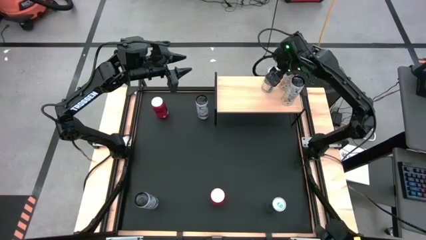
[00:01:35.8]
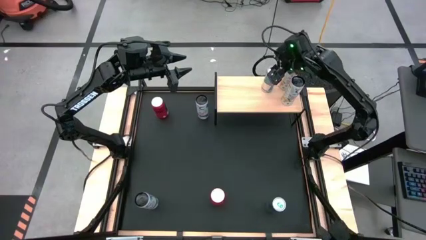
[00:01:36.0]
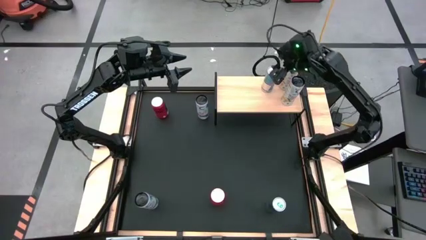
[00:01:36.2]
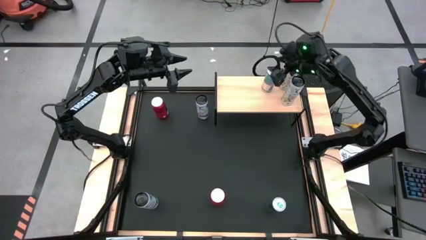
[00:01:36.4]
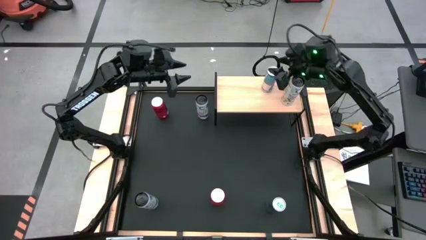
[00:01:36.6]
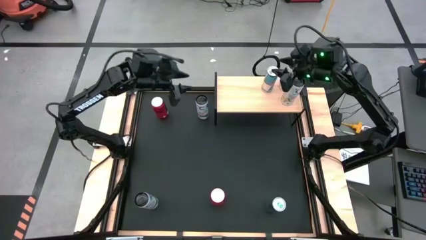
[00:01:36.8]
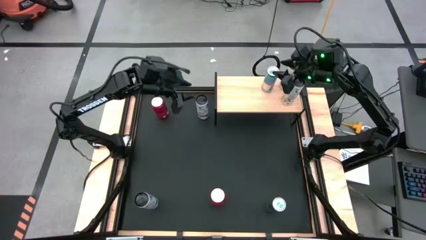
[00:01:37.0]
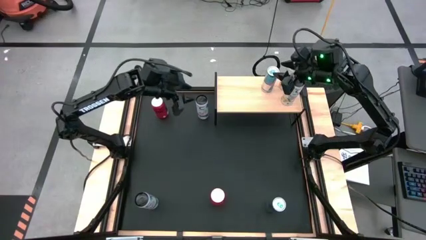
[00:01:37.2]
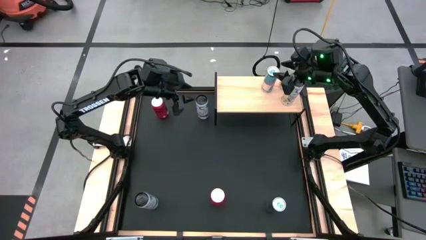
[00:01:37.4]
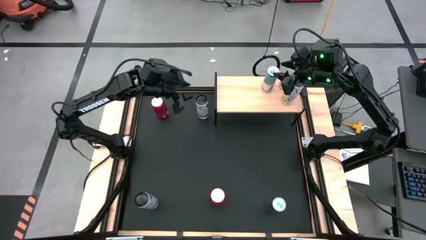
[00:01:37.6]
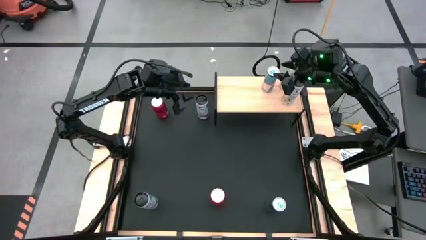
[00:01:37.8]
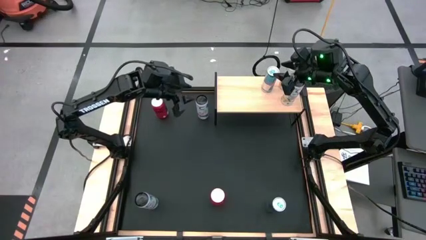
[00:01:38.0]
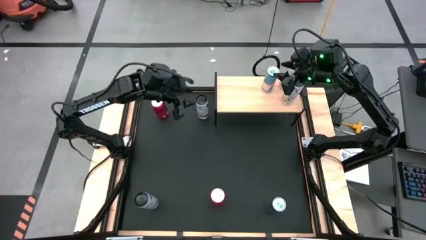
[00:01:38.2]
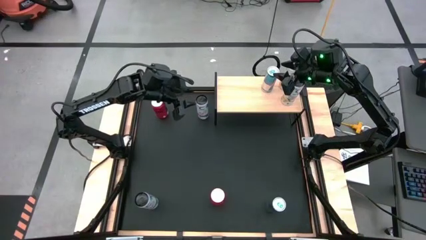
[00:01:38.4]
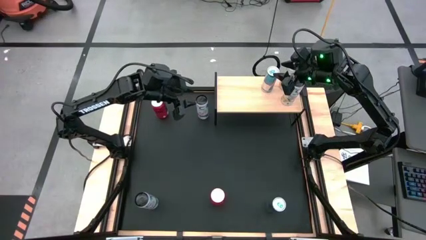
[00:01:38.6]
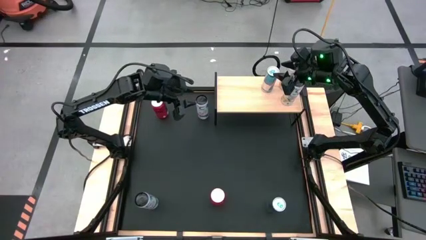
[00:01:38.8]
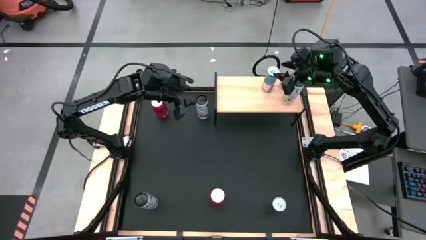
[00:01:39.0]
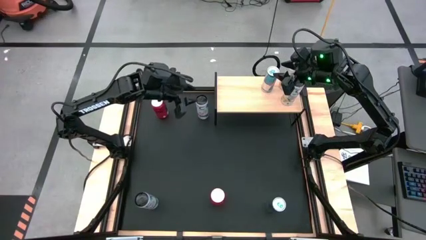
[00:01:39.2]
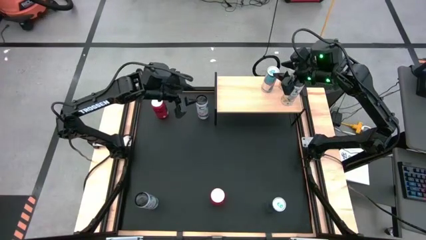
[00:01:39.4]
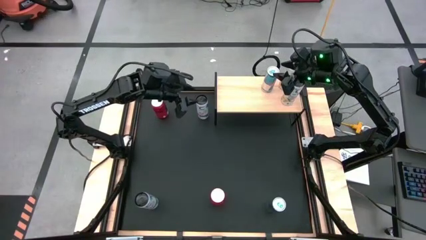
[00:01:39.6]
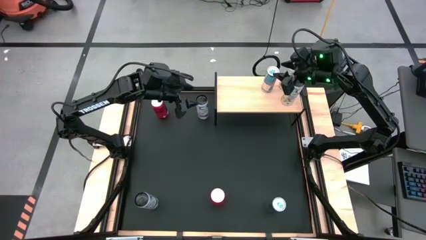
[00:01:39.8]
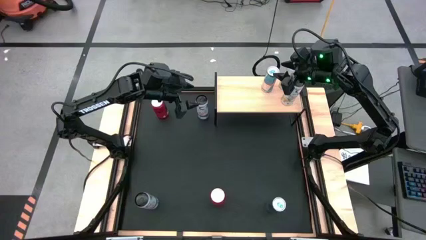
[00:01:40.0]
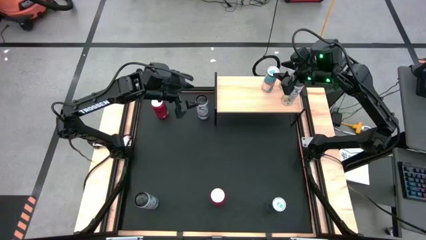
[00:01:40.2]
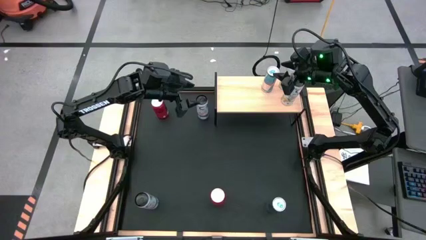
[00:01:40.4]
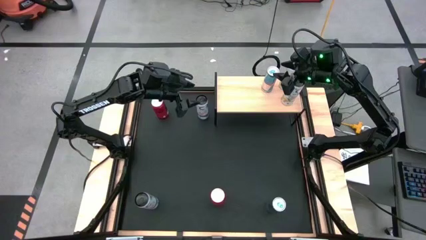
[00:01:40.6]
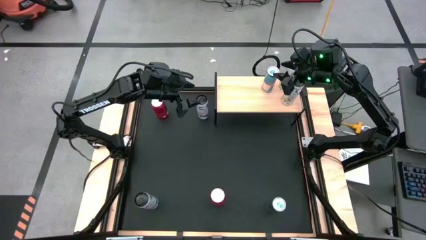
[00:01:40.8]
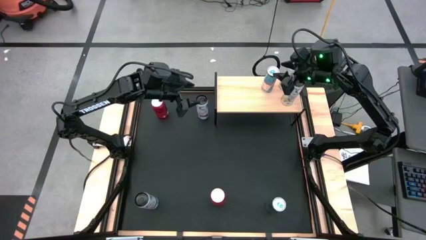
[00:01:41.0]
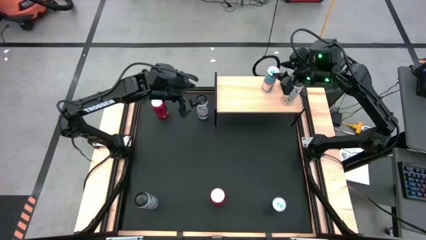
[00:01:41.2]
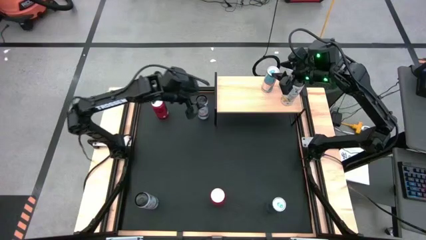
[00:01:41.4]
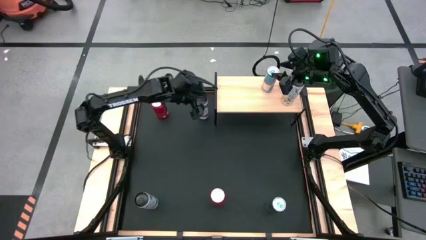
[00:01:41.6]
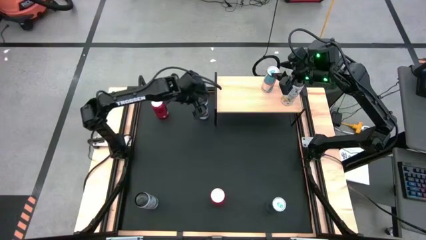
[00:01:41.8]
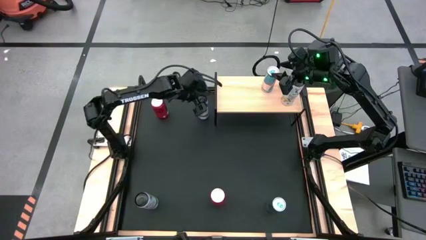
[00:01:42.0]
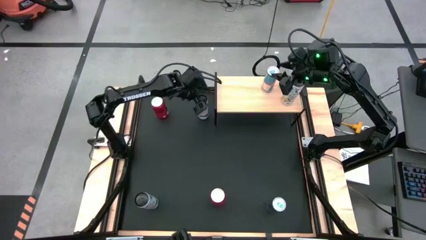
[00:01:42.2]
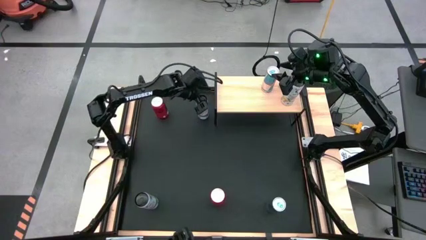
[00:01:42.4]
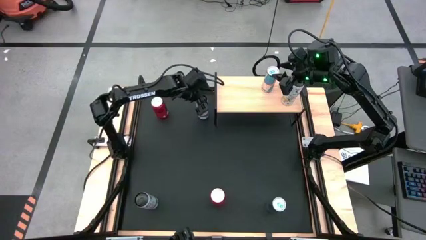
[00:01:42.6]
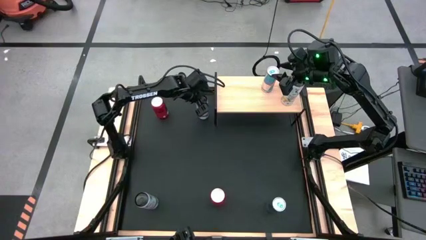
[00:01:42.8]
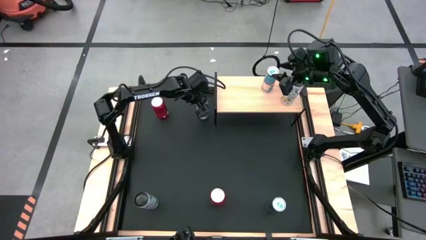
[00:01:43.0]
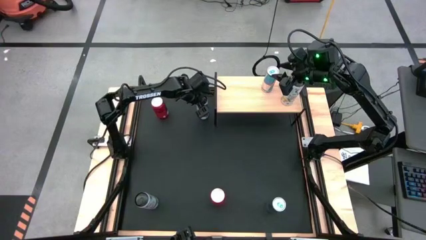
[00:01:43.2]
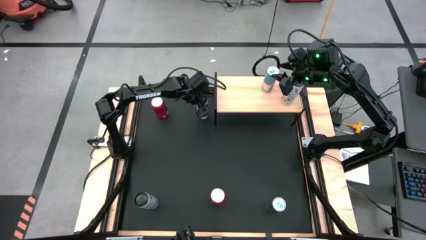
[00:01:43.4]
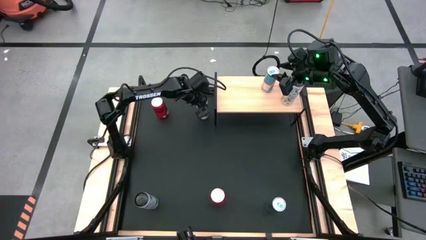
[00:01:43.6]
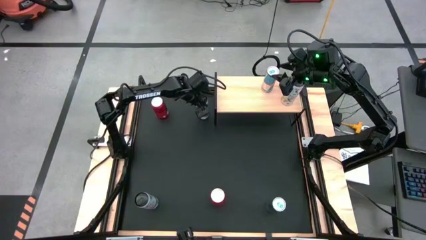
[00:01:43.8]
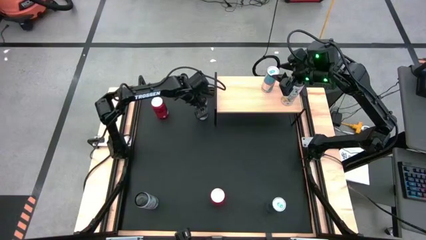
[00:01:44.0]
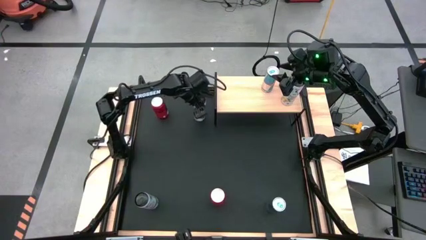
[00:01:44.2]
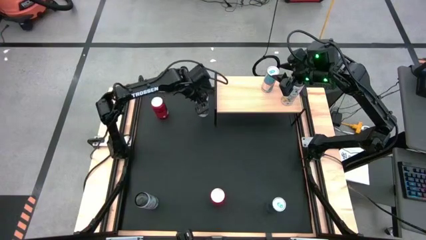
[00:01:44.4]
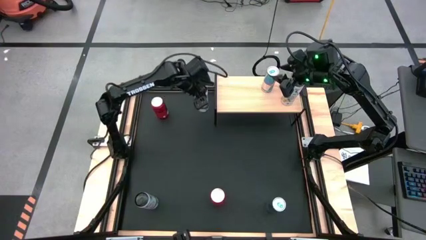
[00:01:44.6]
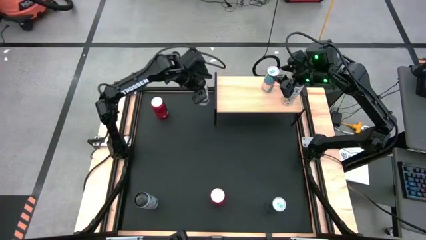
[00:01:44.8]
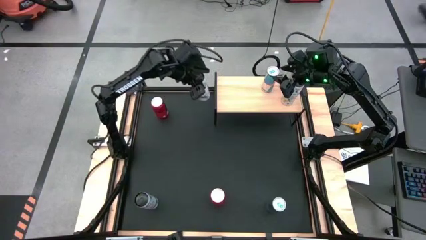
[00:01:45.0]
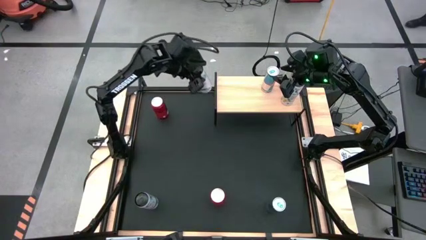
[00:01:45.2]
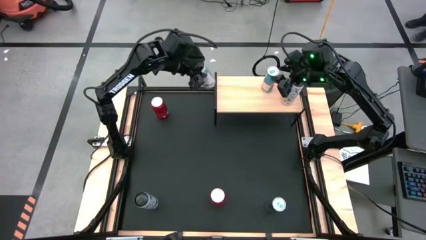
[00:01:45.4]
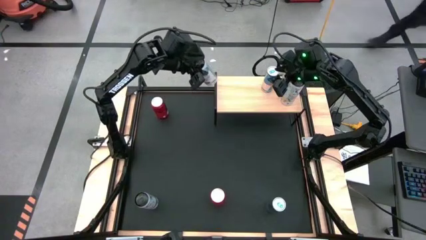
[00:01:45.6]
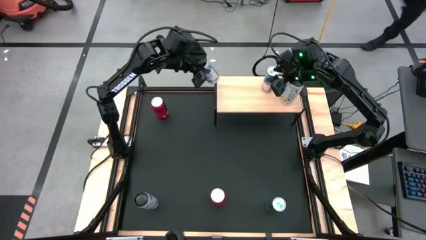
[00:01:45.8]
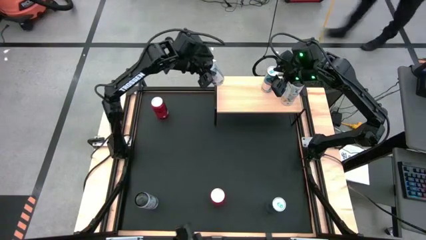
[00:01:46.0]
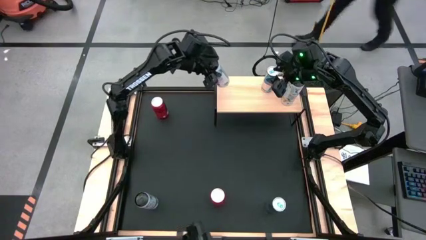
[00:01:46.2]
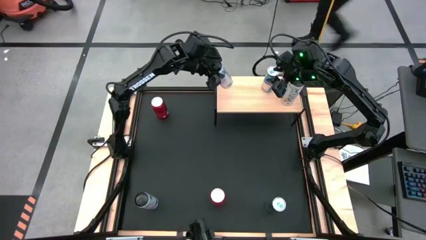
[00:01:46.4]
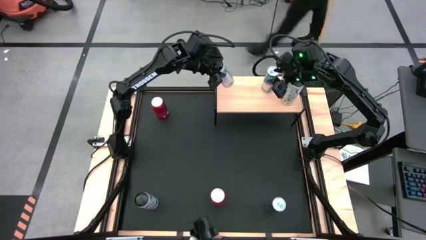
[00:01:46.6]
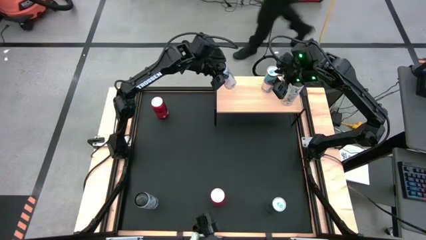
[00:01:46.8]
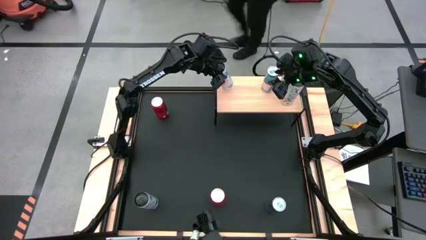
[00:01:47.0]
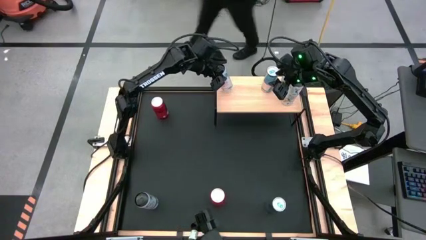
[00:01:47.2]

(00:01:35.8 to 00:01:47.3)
Task: Place canned beverage on shelf
Put the top white-pink soda can on the shelf
